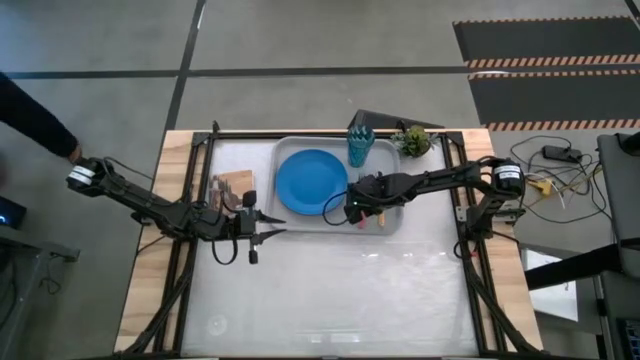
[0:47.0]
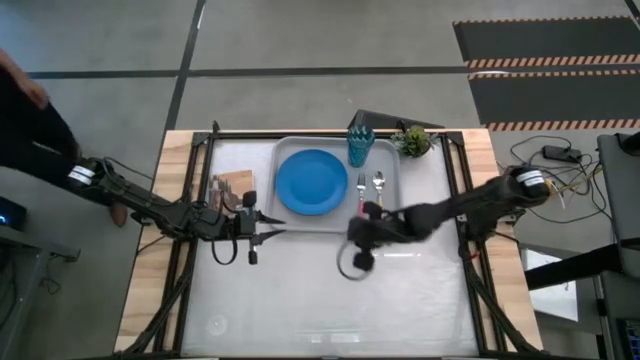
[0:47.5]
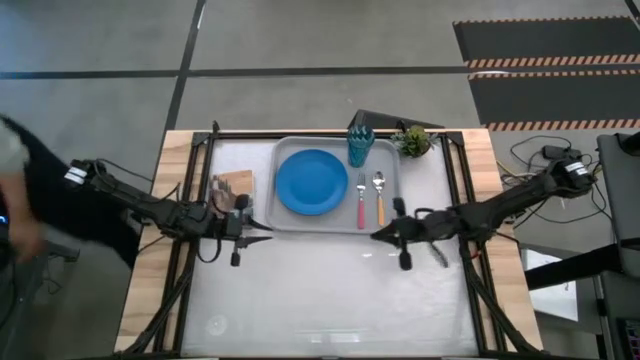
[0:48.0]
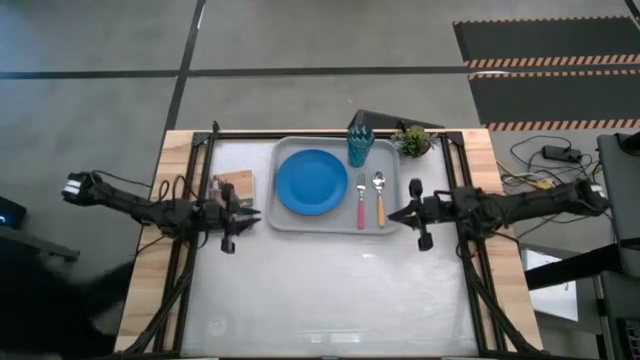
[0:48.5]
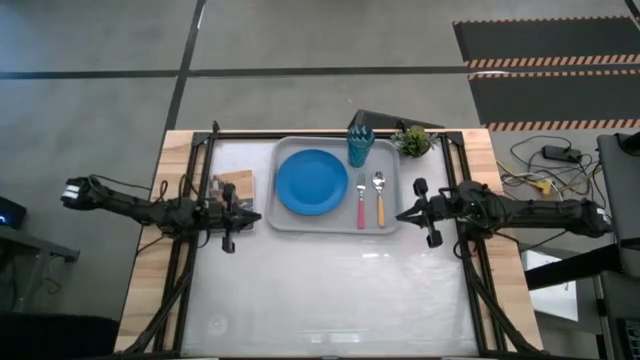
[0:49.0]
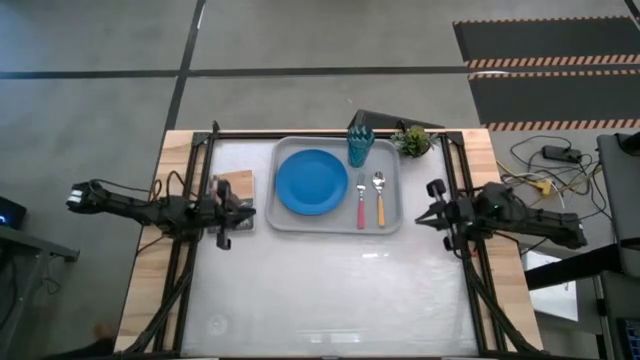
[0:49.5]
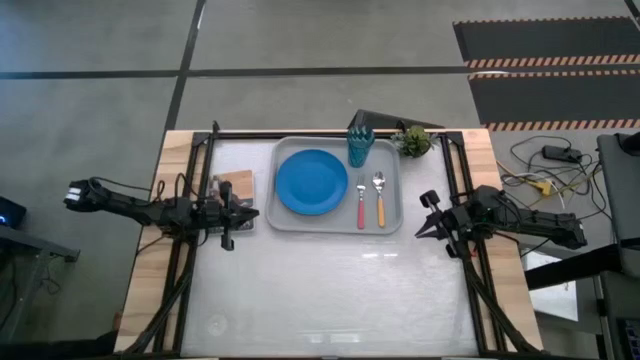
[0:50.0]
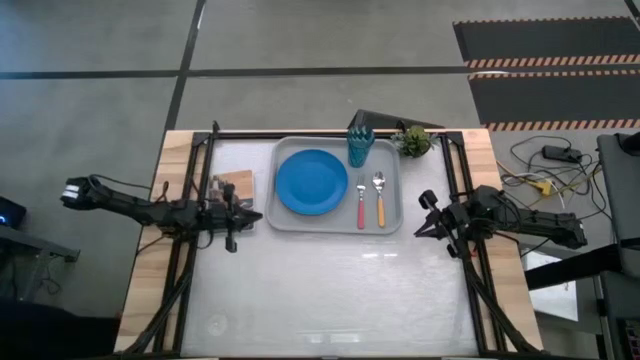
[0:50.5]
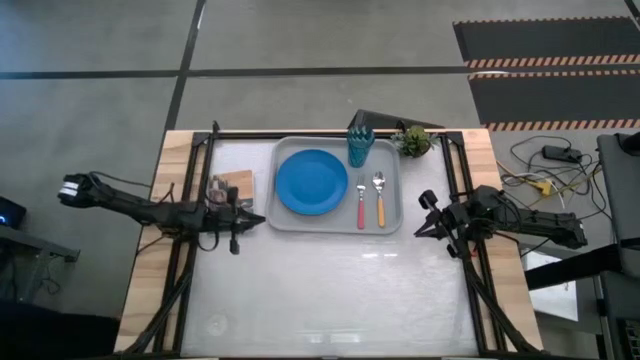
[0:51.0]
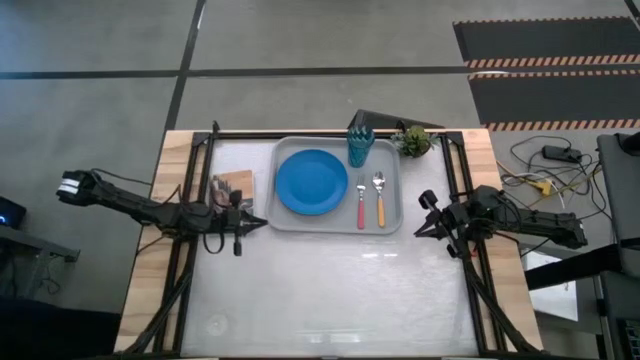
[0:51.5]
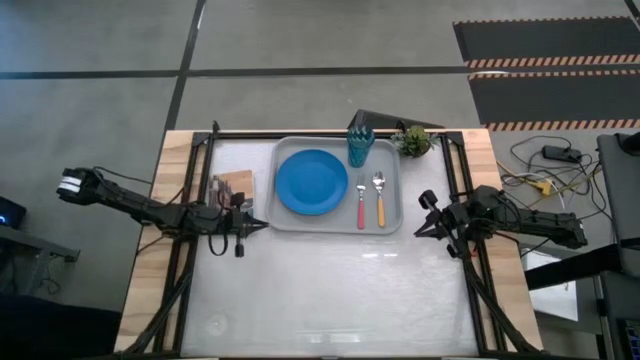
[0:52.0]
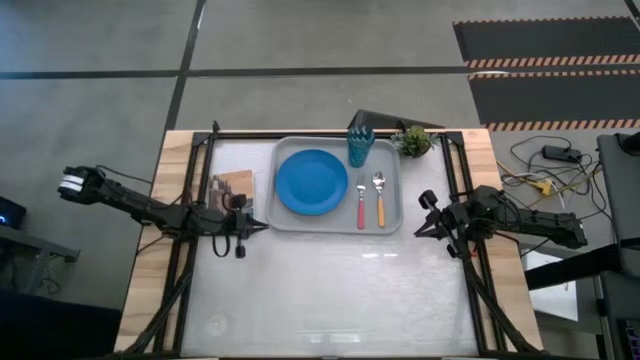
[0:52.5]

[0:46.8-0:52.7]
Task: Pick and place plate/cup/fork/spoon on tray
Return to Home Position

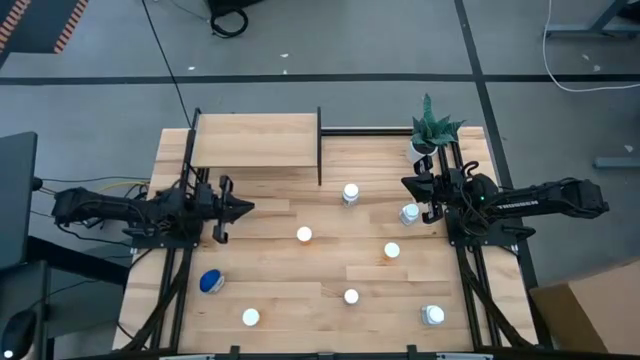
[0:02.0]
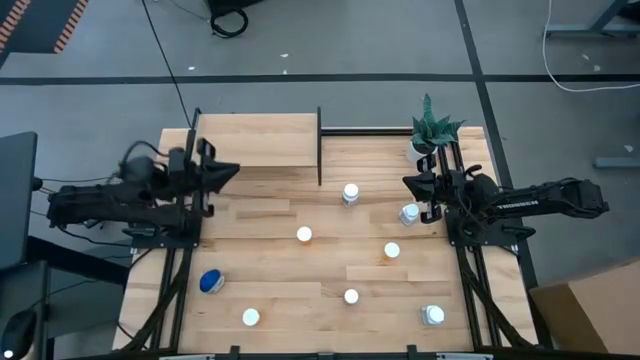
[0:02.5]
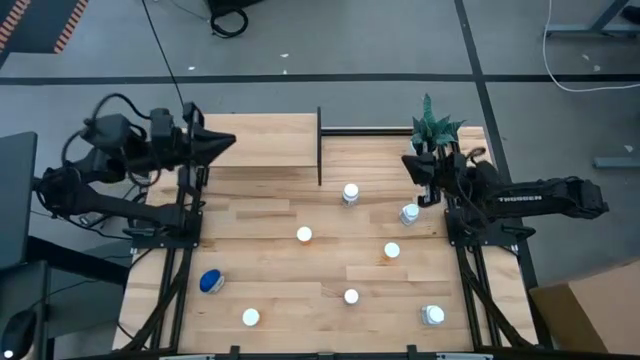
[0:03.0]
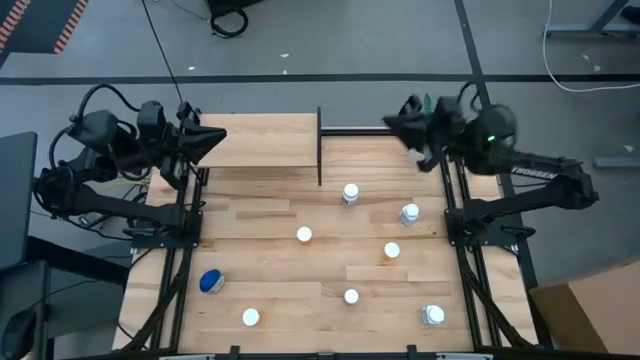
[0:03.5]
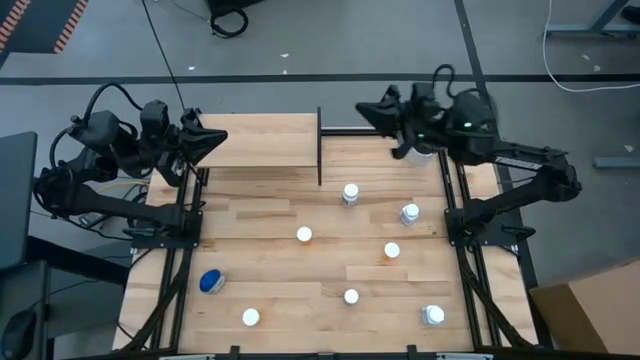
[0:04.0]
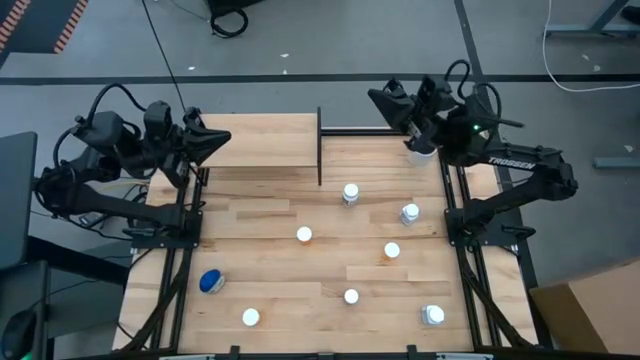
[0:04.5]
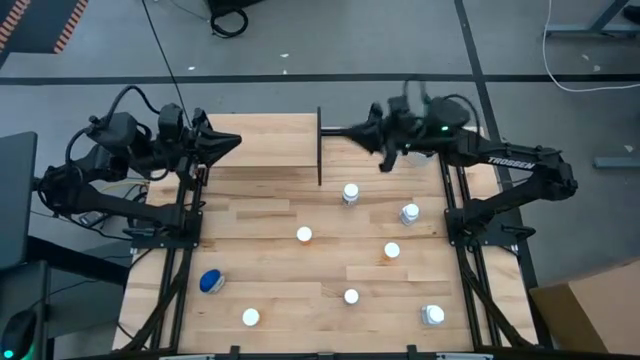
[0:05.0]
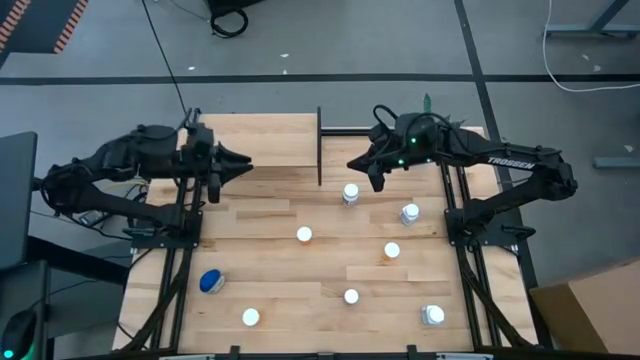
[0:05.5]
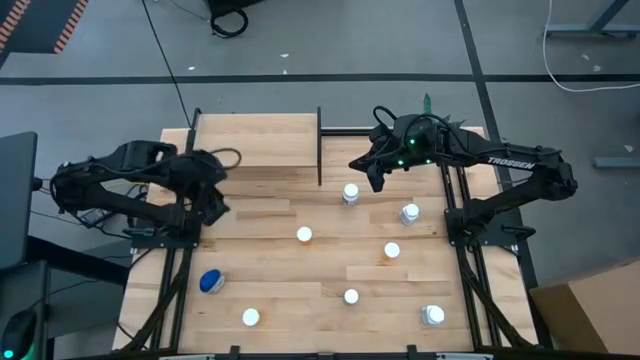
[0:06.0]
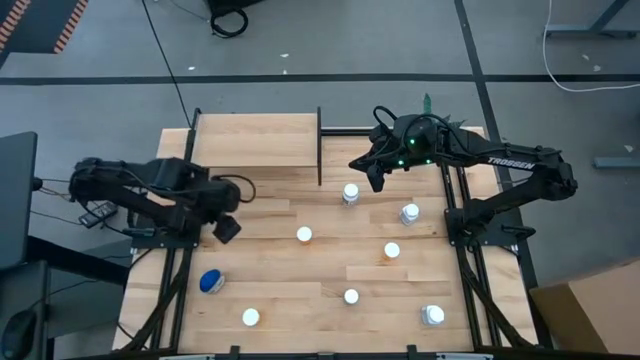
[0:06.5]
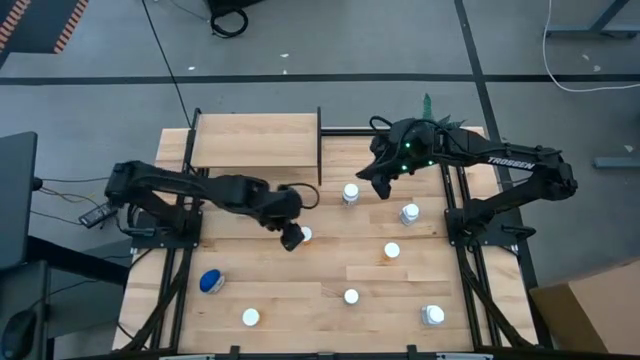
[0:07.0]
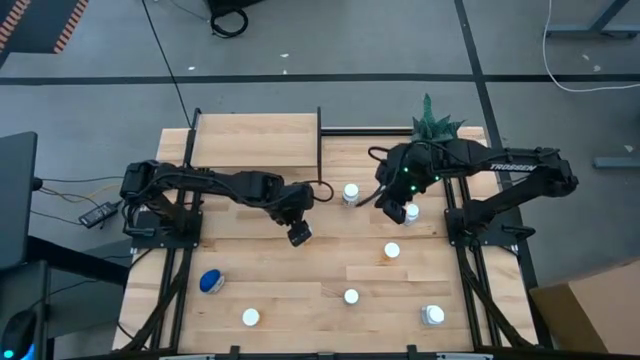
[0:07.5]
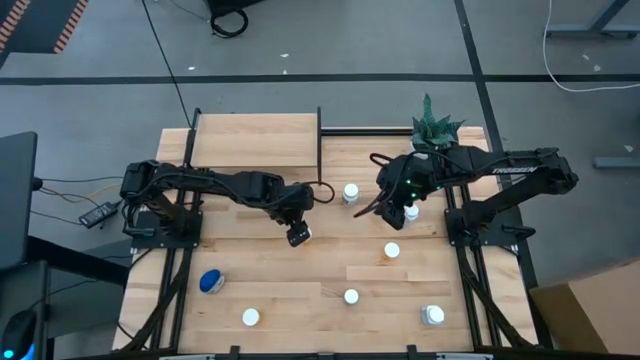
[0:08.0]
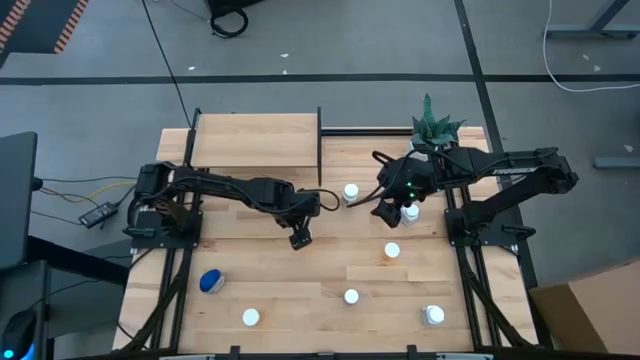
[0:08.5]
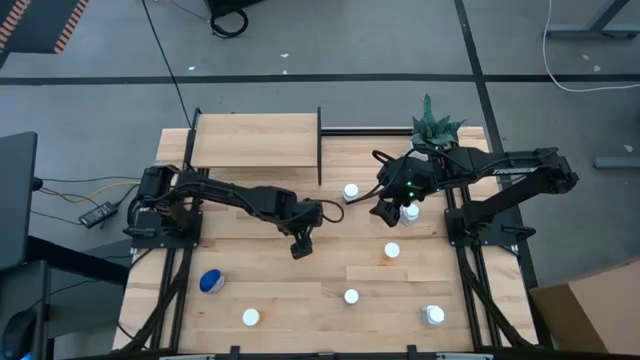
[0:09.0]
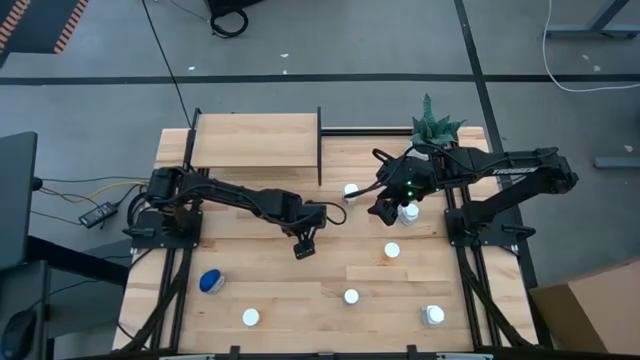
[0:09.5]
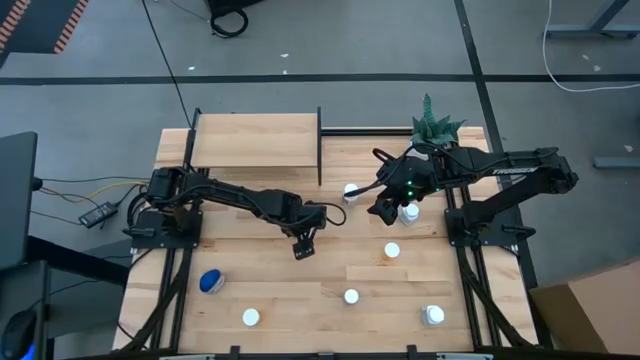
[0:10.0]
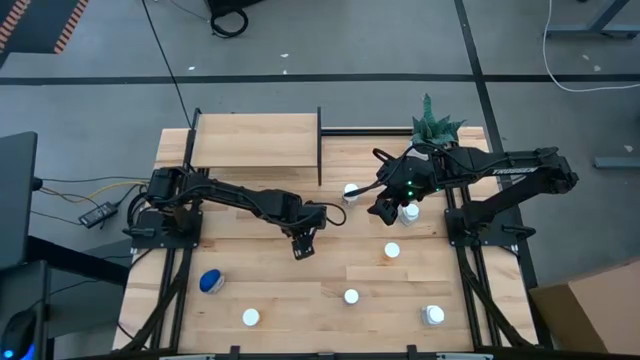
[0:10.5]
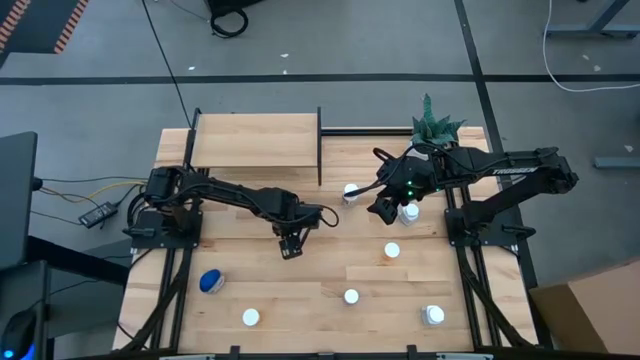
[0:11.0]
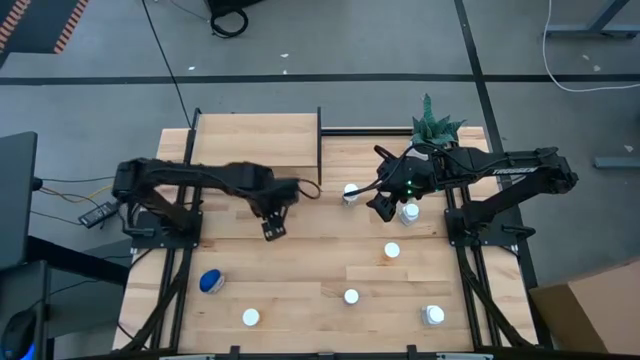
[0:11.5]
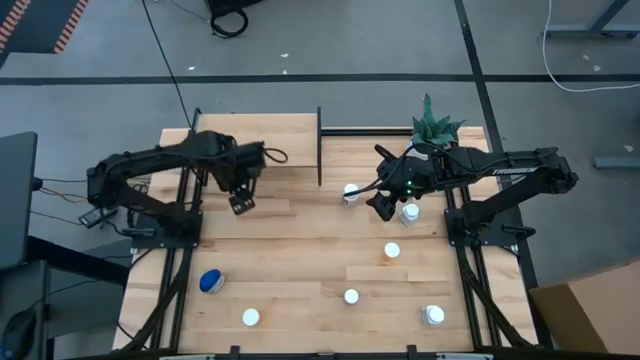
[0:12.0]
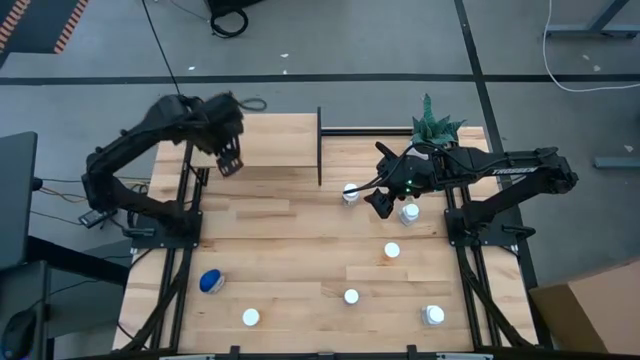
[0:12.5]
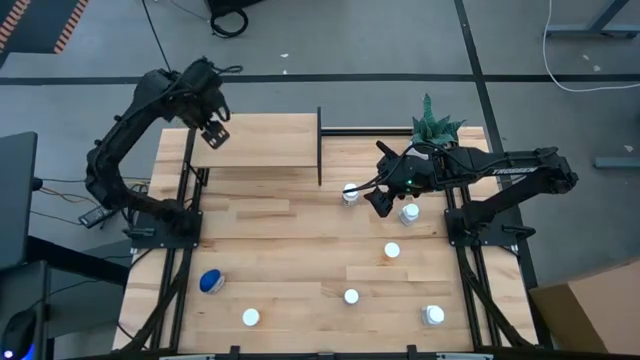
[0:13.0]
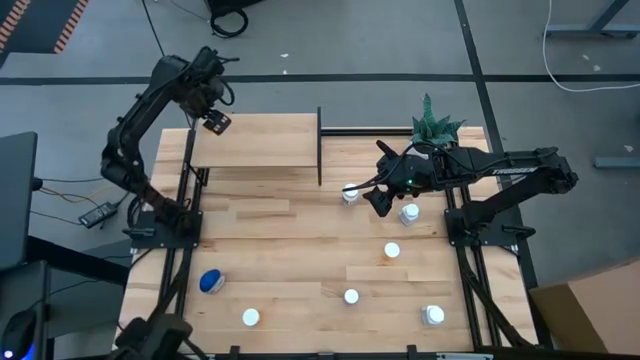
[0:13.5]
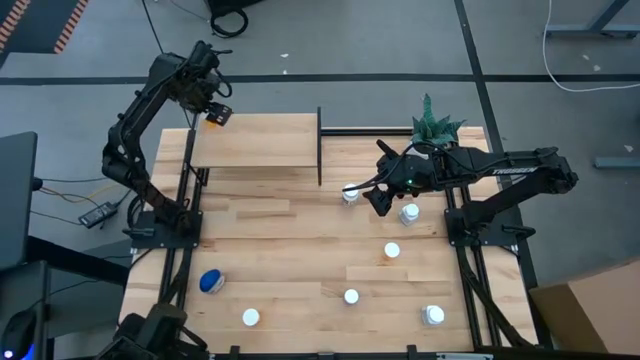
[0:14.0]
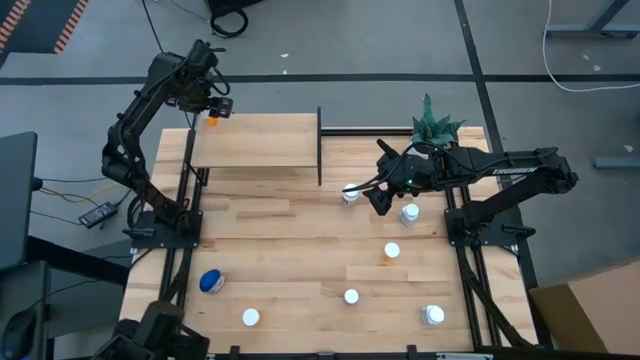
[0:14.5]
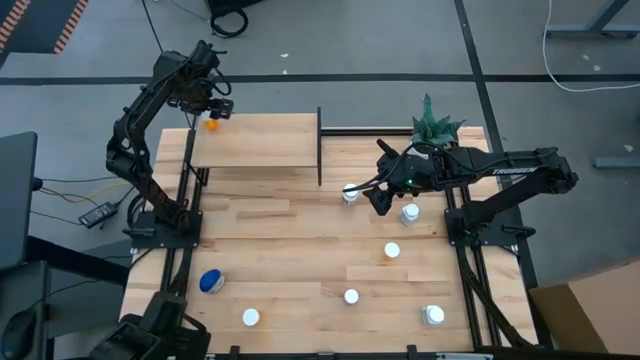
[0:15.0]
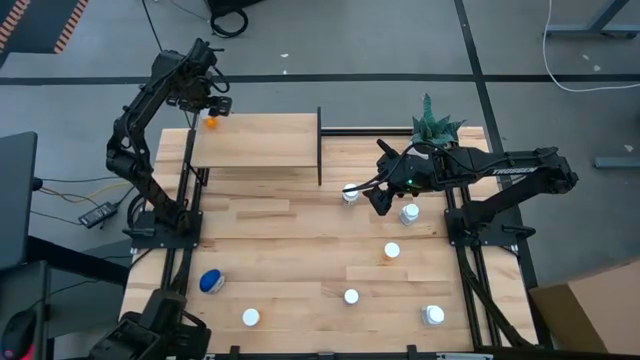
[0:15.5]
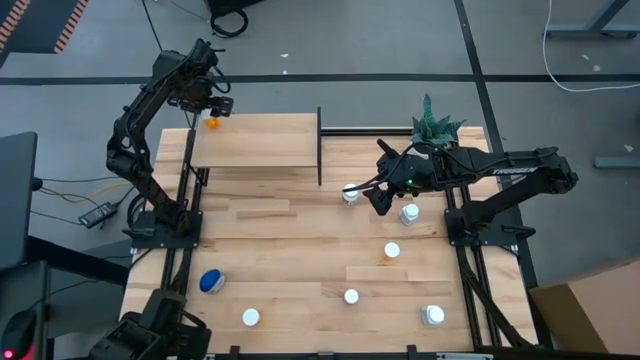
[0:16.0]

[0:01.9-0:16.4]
Task: Pick and place medicine bottles onto shelf by color
Put the top left orange pill bottle on the shelf
